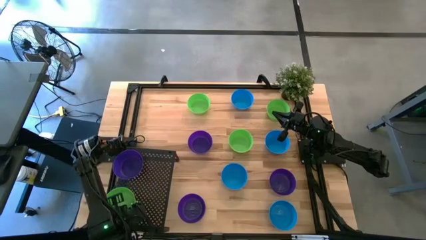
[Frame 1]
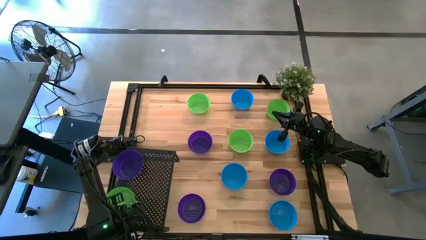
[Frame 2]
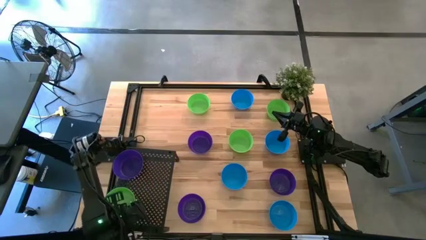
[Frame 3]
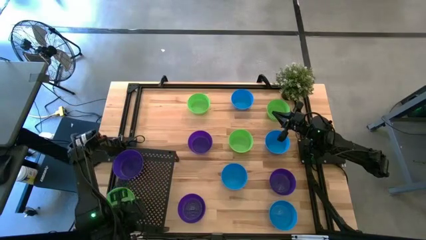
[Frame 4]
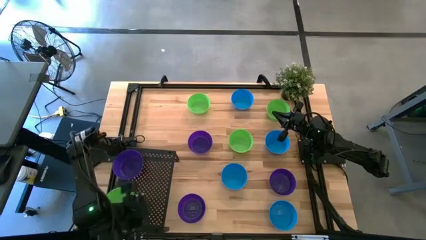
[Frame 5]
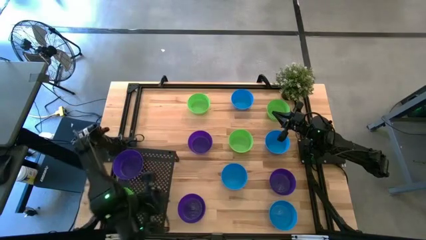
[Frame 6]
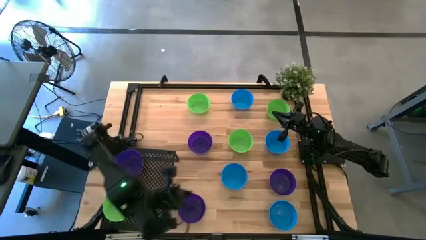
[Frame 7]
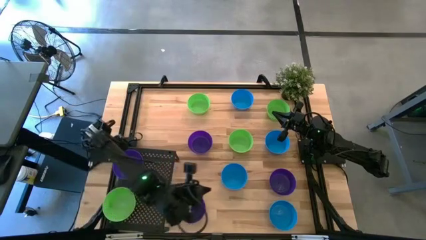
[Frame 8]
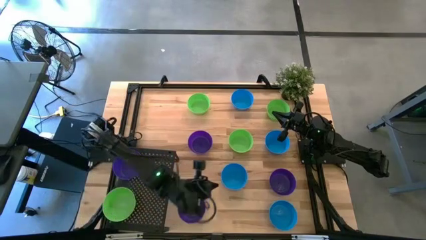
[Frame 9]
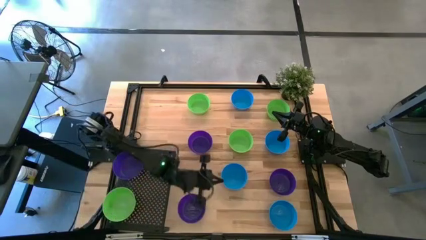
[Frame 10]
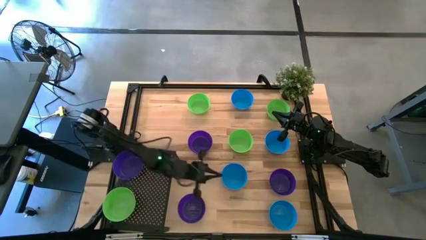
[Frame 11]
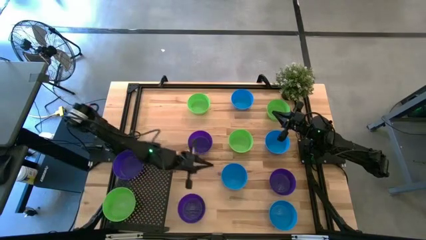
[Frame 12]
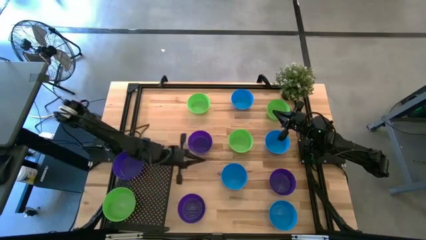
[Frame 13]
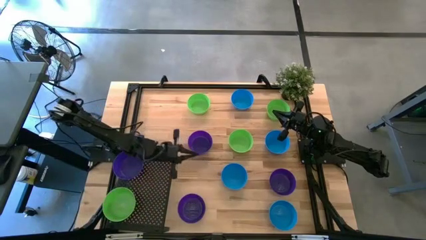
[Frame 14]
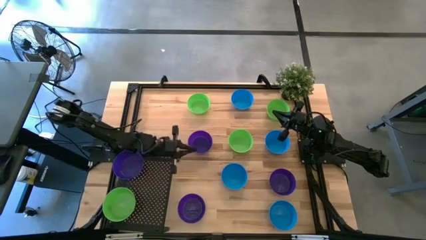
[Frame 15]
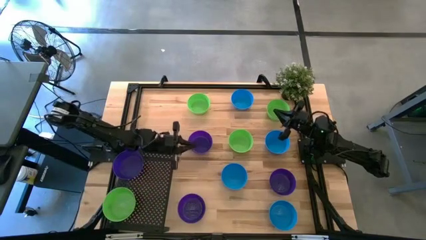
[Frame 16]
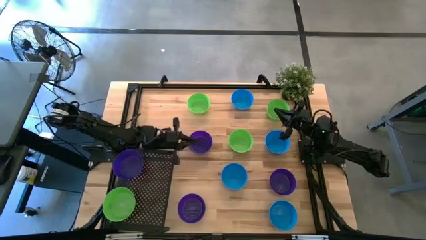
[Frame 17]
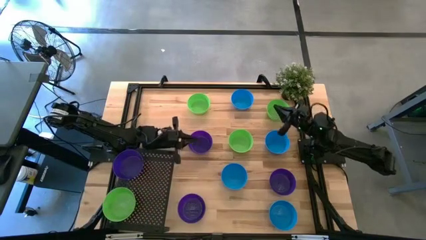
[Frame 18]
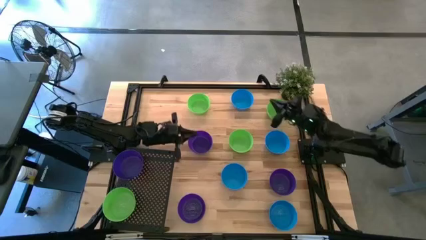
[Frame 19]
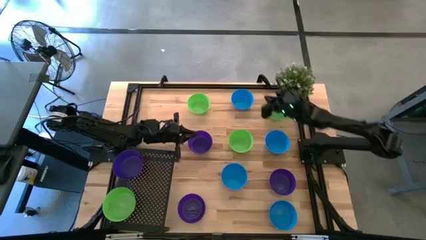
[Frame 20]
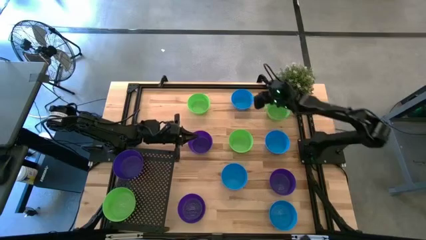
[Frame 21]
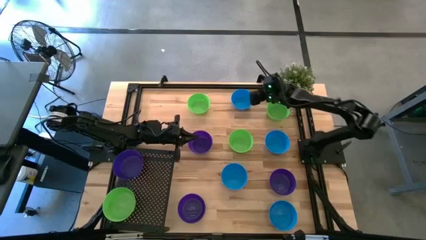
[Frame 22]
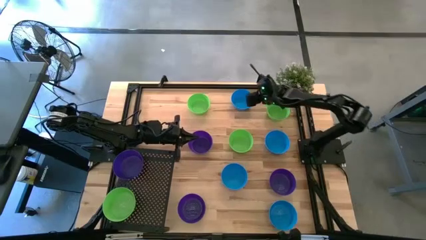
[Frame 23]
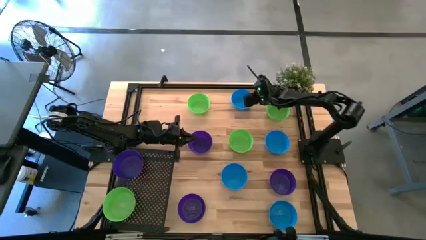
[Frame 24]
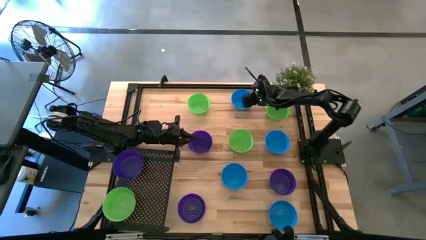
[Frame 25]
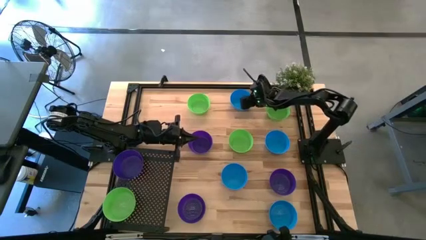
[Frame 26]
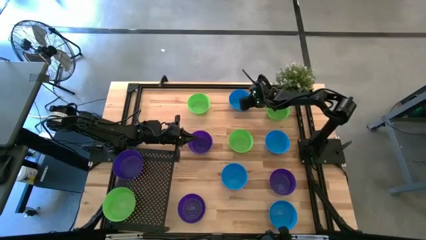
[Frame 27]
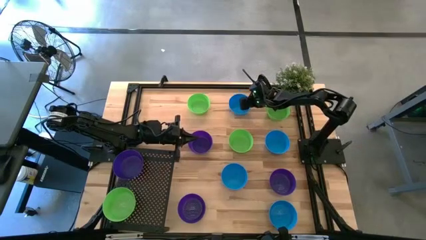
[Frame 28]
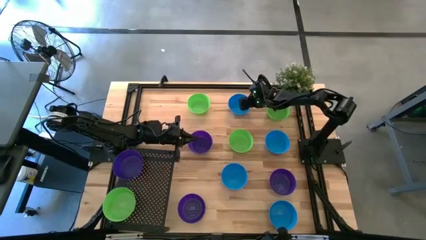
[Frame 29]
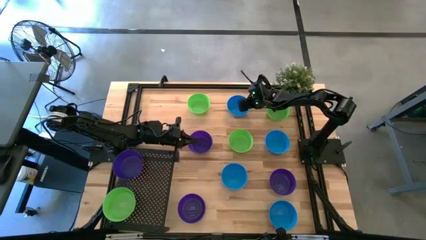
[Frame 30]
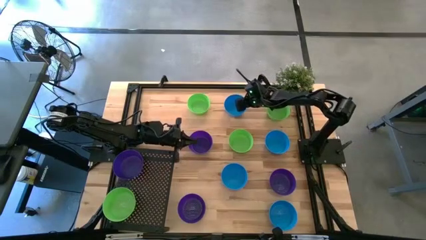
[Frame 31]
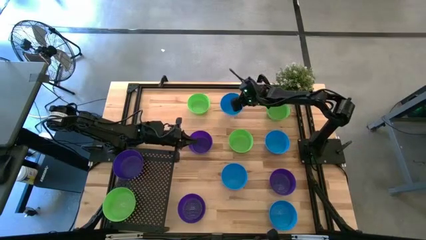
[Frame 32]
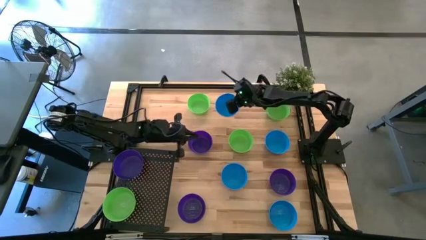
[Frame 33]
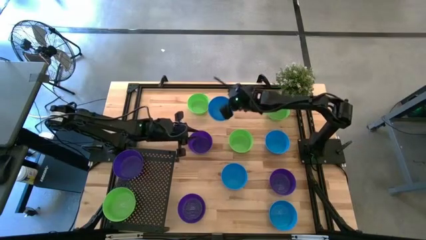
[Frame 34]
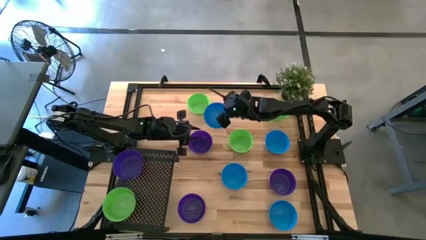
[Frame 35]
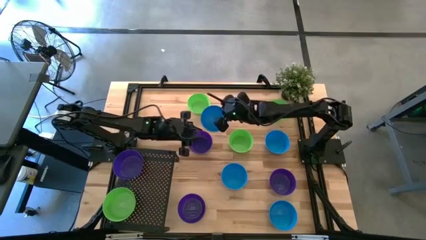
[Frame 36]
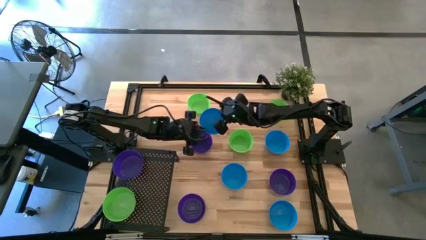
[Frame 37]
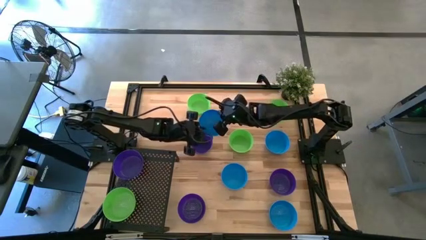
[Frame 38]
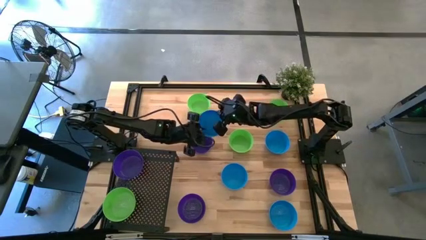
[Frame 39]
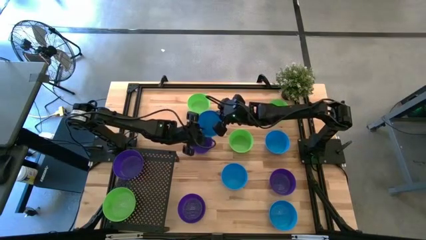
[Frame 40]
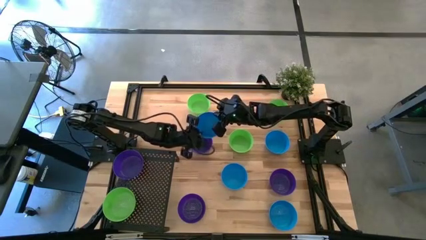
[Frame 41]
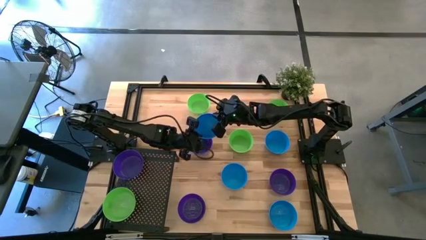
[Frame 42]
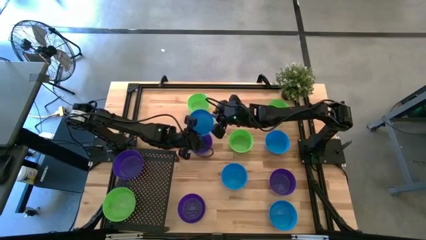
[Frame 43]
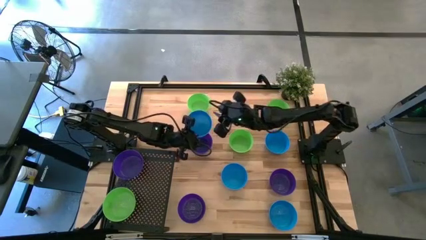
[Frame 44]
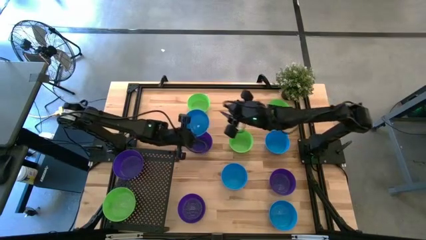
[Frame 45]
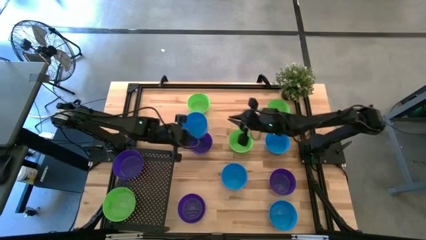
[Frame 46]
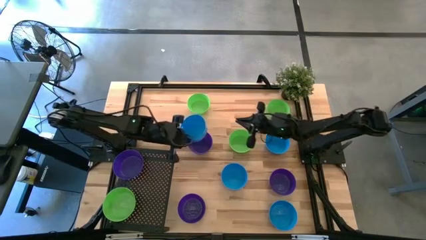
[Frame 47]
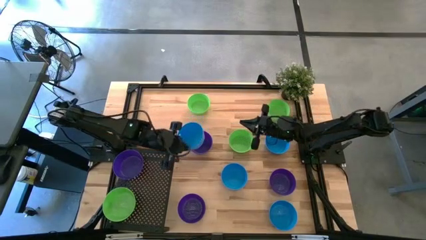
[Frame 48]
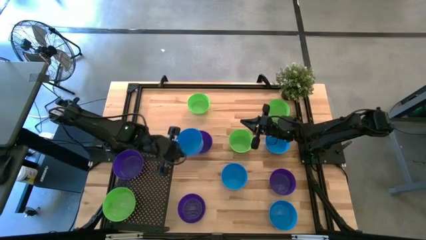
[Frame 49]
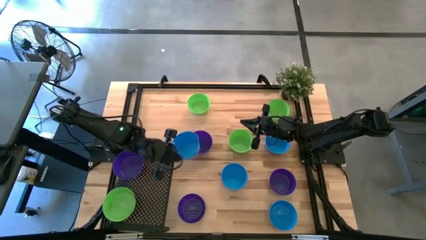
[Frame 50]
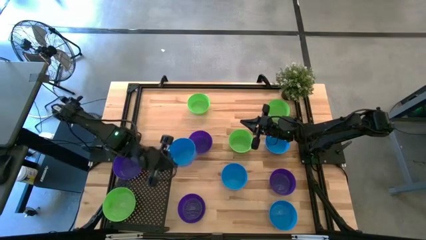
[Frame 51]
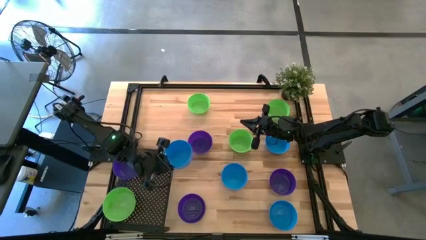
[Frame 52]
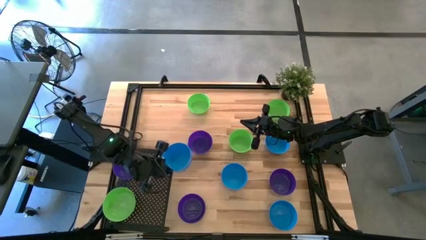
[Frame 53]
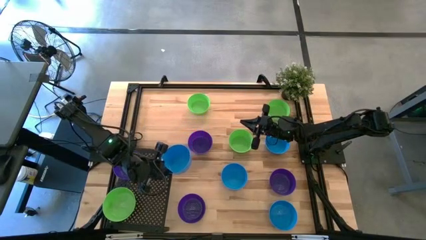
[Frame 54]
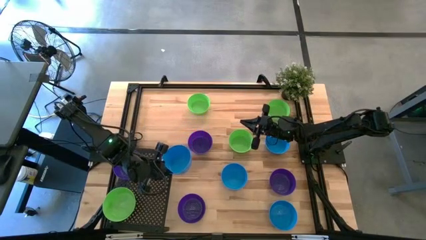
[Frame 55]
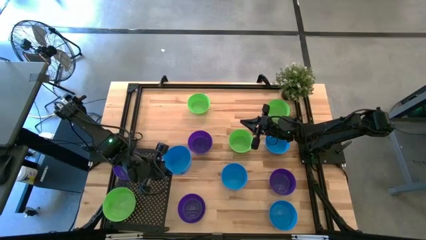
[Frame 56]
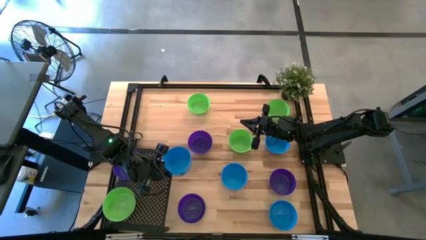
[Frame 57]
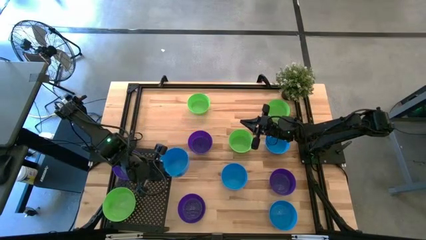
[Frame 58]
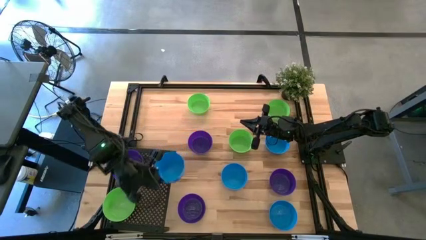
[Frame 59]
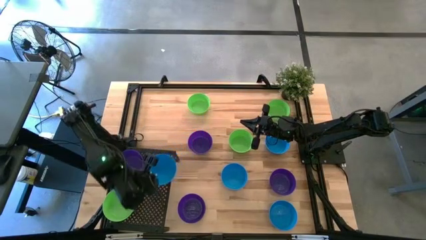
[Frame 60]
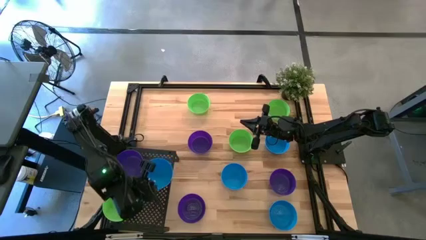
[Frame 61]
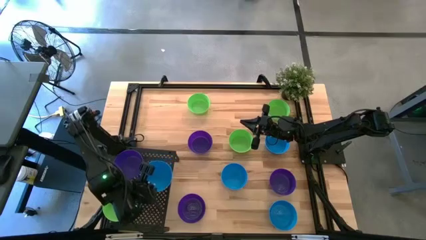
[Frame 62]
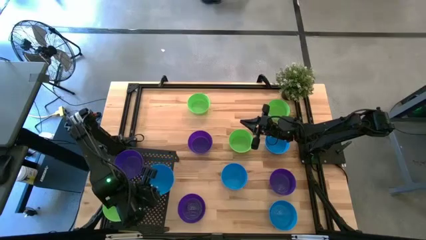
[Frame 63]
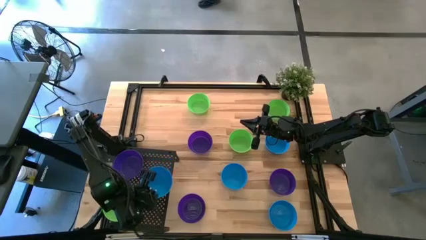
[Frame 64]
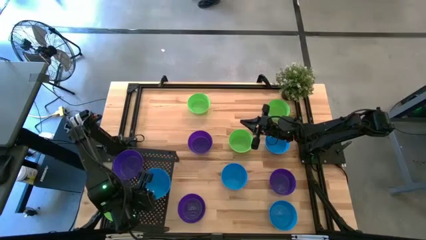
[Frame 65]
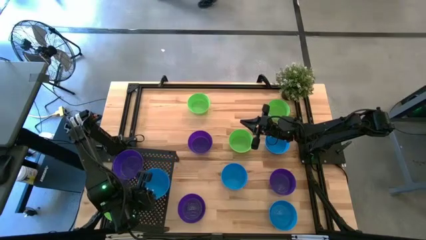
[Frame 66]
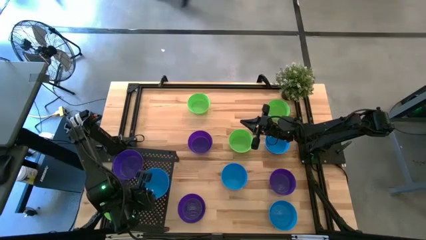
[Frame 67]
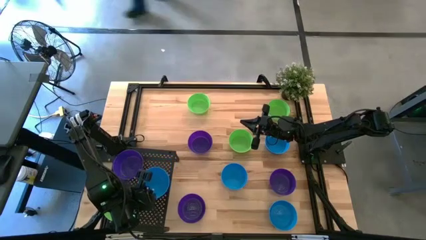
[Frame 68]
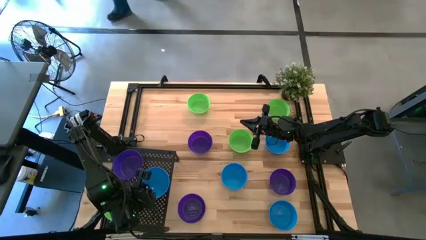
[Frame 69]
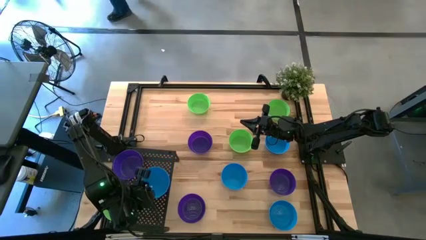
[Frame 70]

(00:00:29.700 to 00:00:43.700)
Task: Pick & Place Mini bowls
Put the blue bowl on the shelf

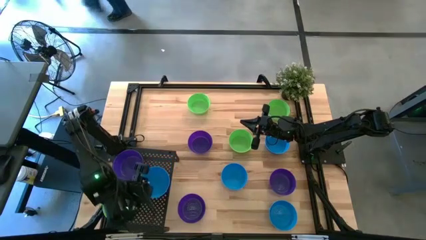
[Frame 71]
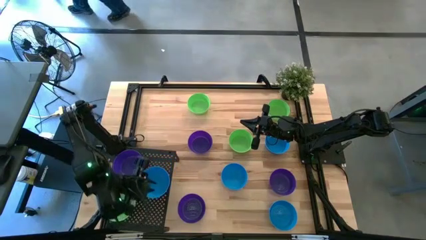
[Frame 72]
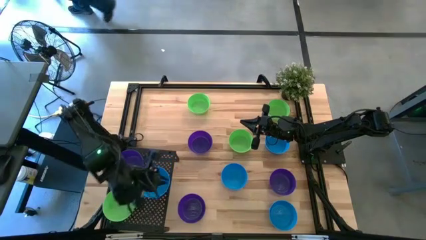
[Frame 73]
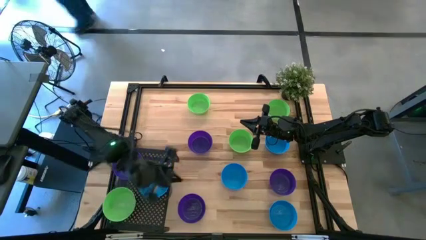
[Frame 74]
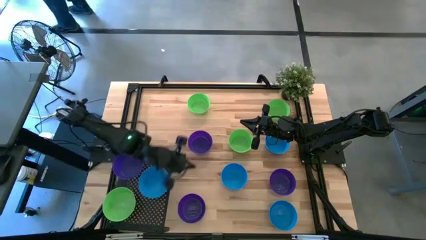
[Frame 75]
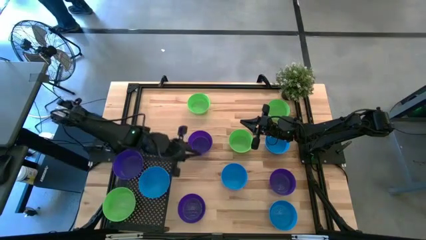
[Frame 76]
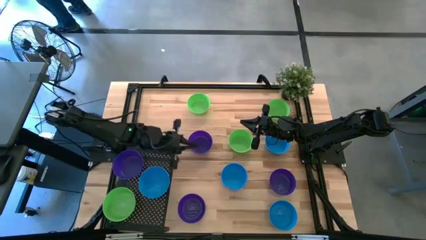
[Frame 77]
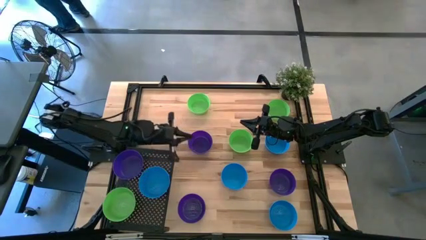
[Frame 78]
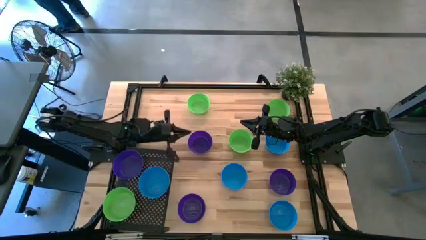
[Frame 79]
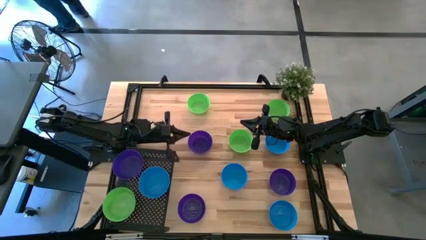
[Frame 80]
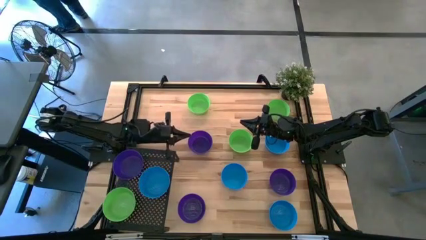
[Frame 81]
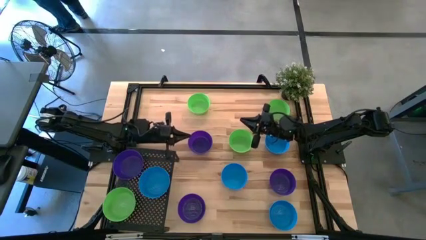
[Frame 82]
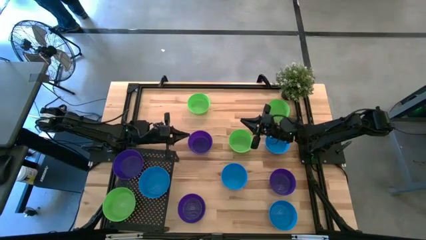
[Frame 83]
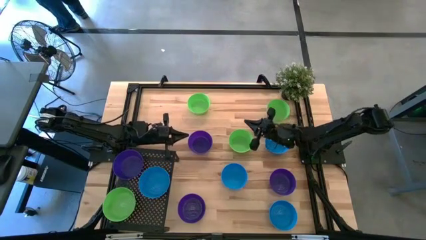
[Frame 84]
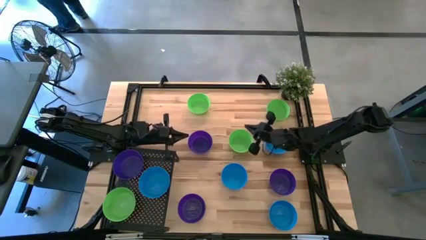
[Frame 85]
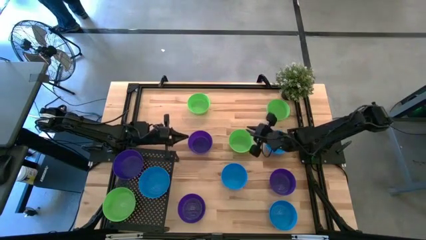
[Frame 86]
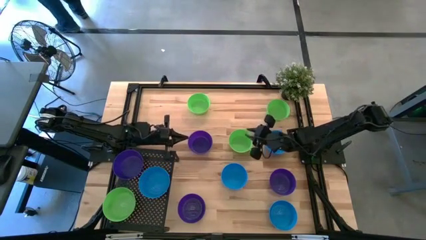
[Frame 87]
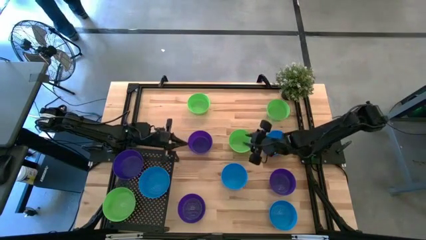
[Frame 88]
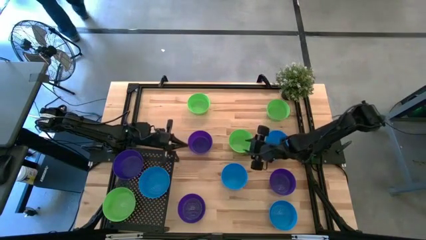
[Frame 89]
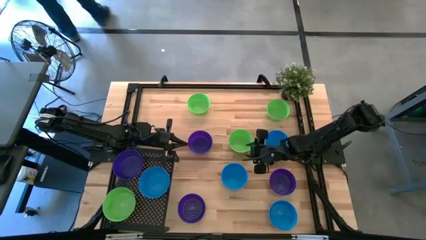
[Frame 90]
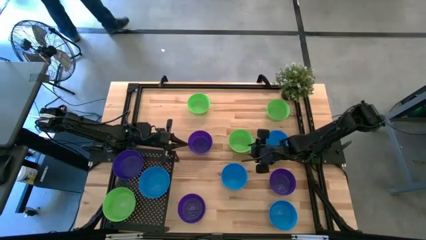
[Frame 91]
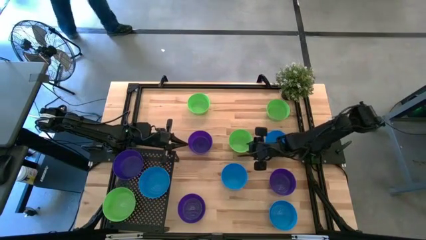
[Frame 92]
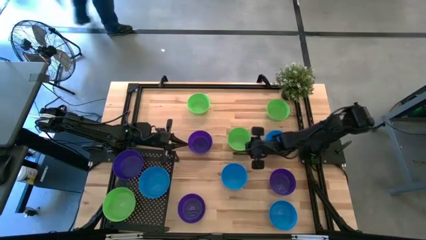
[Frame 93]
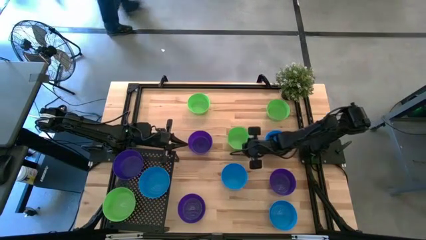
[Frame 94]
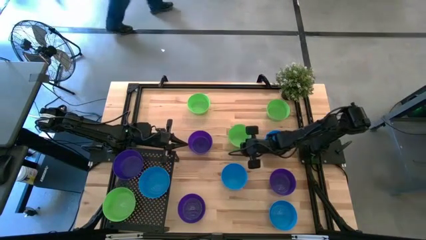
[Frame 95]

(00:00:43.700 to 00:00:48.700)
Stack the green bowl on the other green bowl on the shelf
